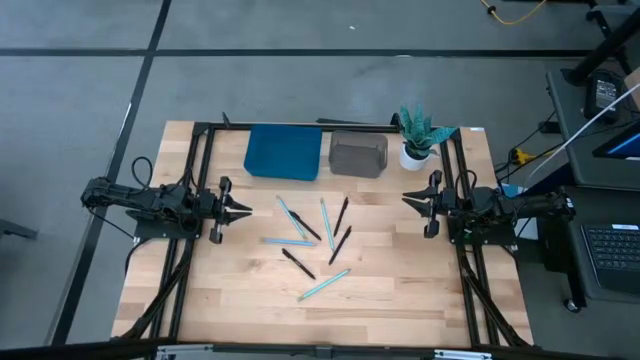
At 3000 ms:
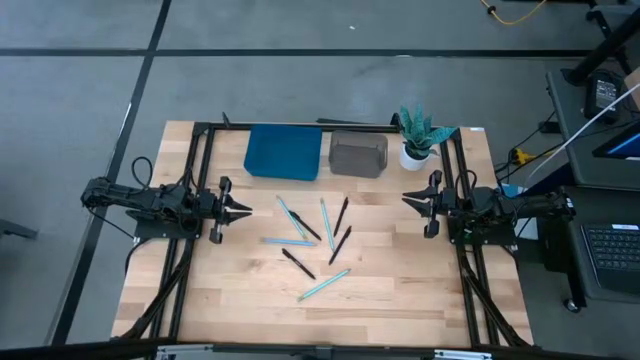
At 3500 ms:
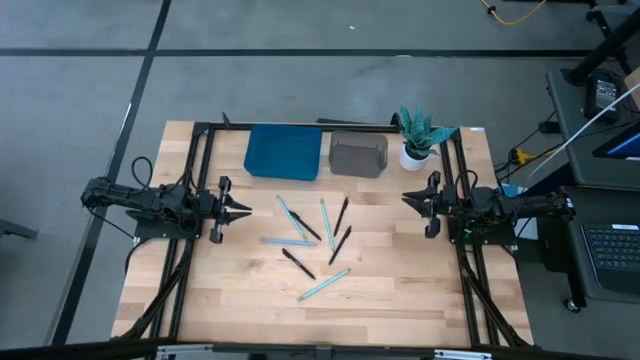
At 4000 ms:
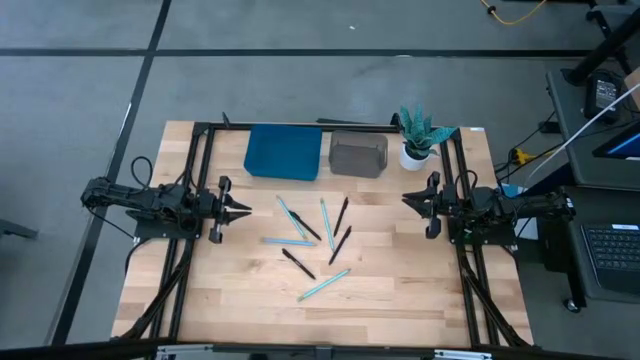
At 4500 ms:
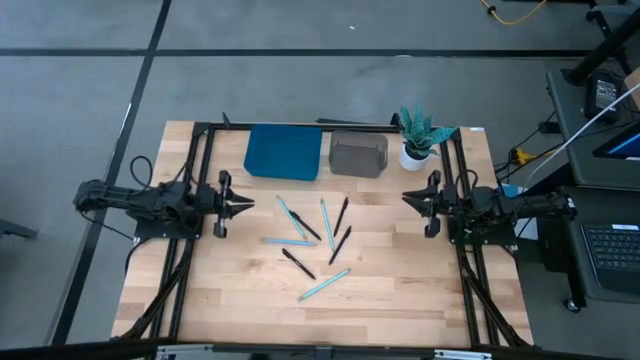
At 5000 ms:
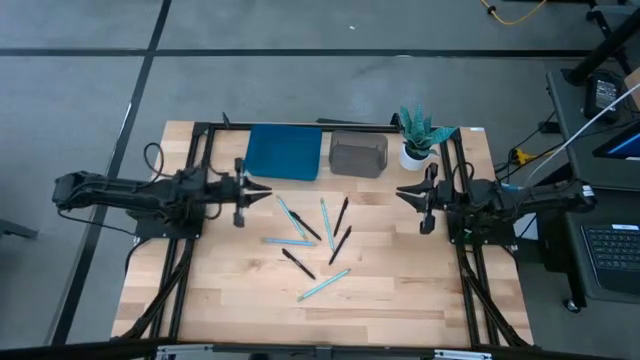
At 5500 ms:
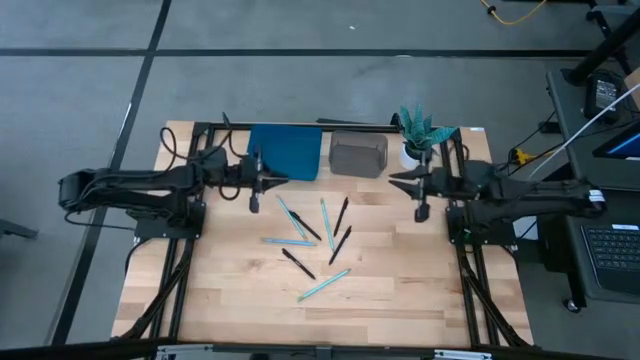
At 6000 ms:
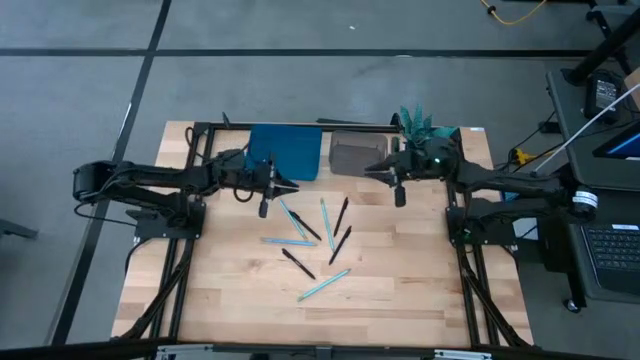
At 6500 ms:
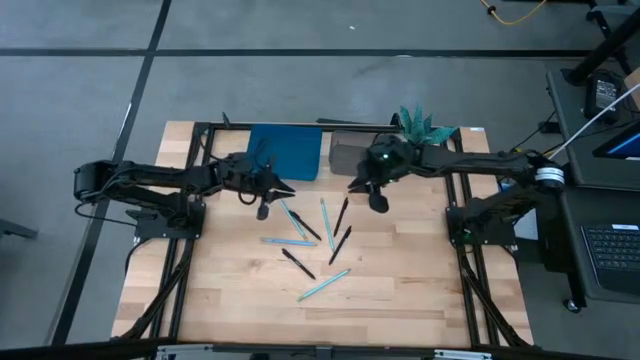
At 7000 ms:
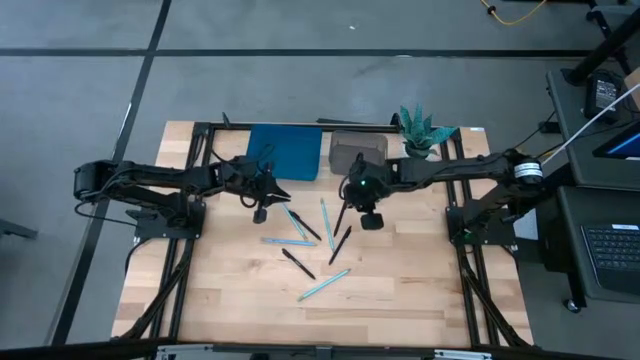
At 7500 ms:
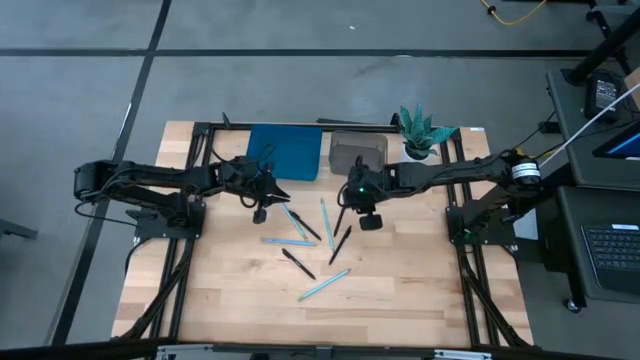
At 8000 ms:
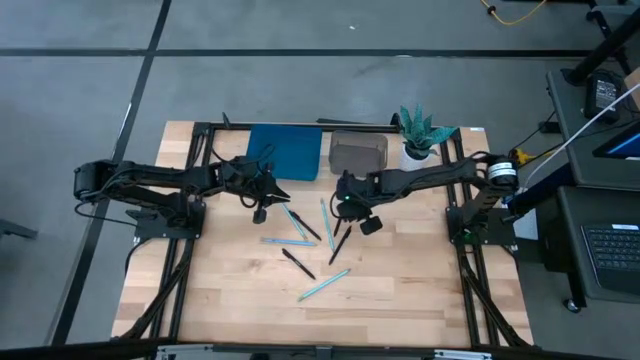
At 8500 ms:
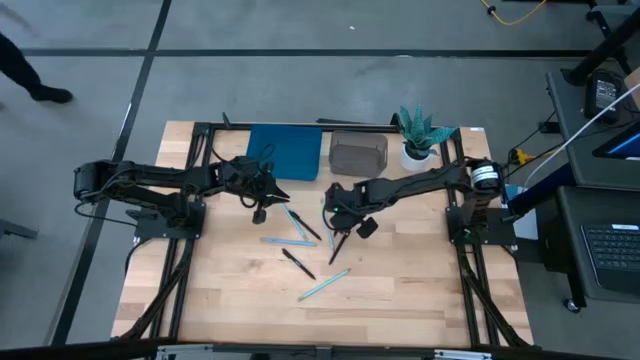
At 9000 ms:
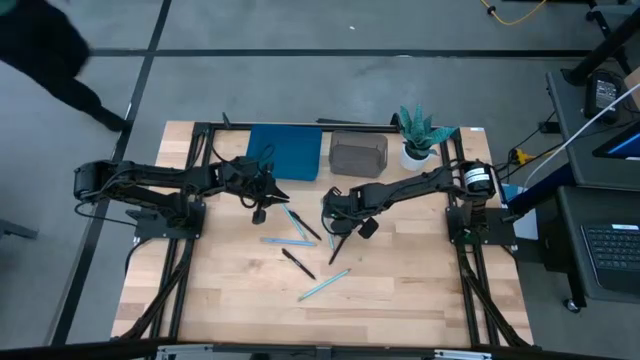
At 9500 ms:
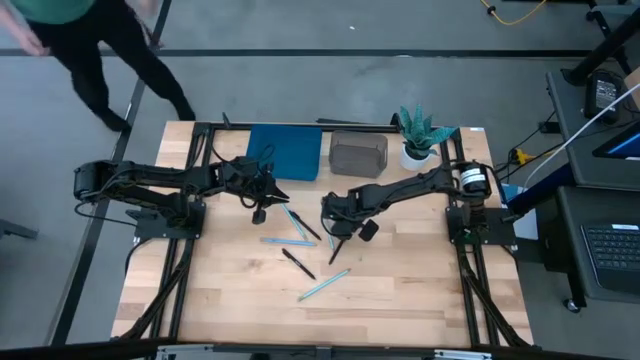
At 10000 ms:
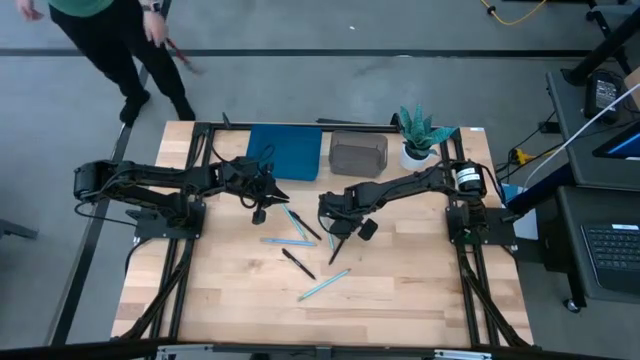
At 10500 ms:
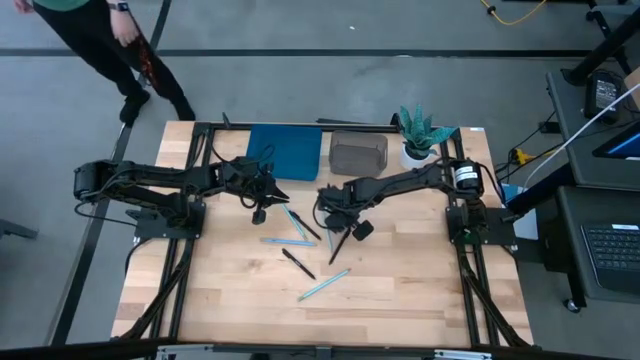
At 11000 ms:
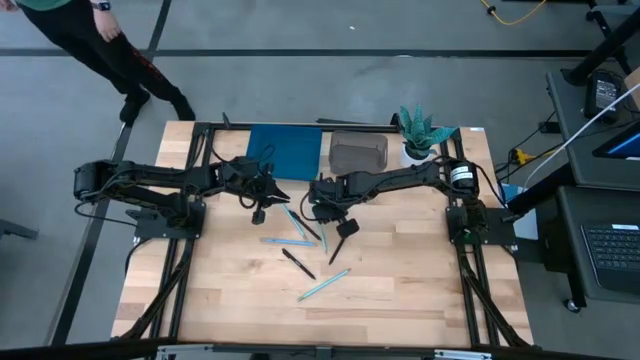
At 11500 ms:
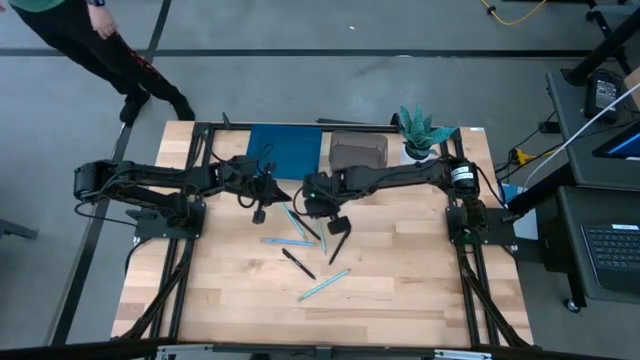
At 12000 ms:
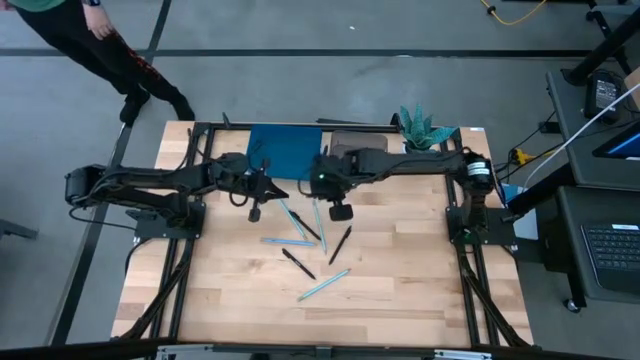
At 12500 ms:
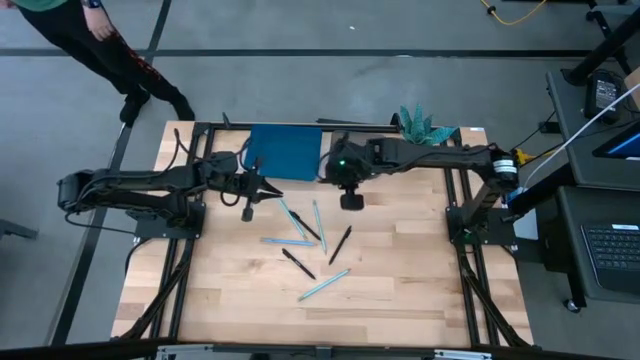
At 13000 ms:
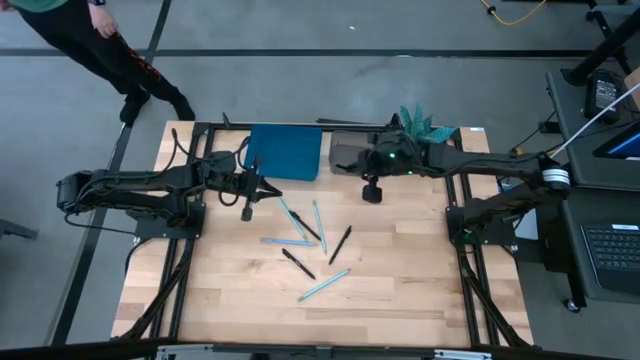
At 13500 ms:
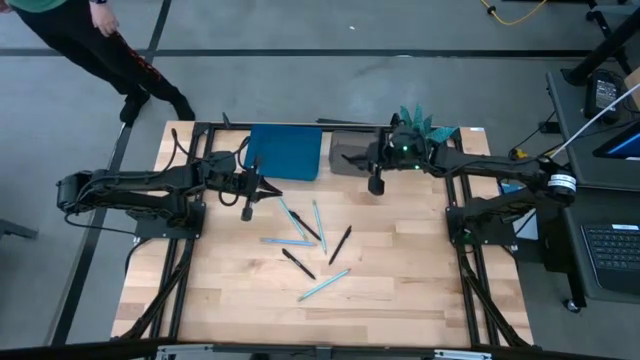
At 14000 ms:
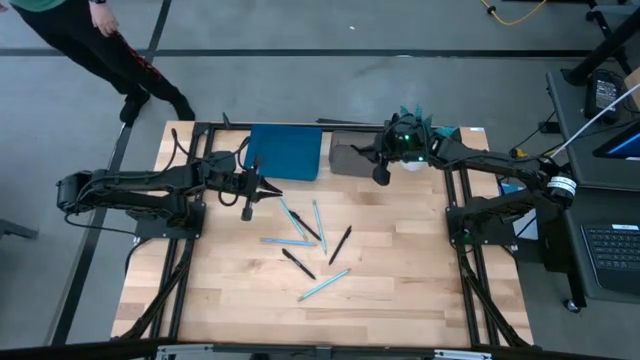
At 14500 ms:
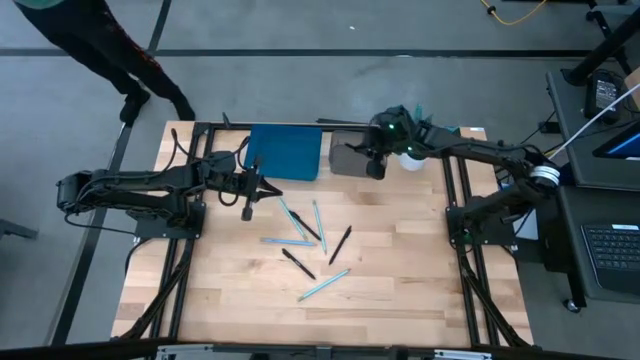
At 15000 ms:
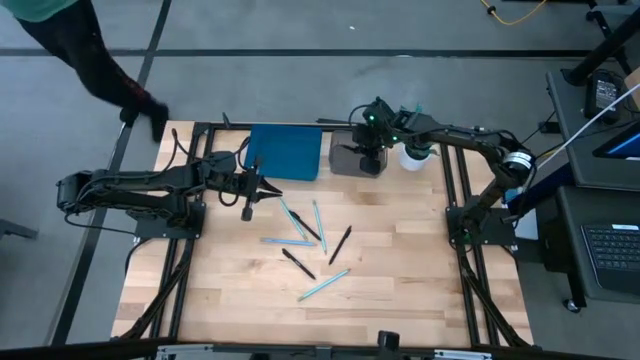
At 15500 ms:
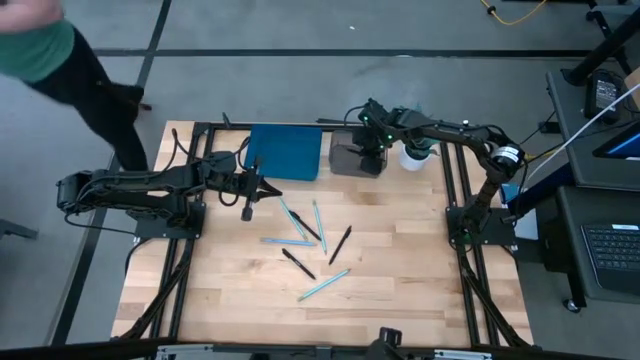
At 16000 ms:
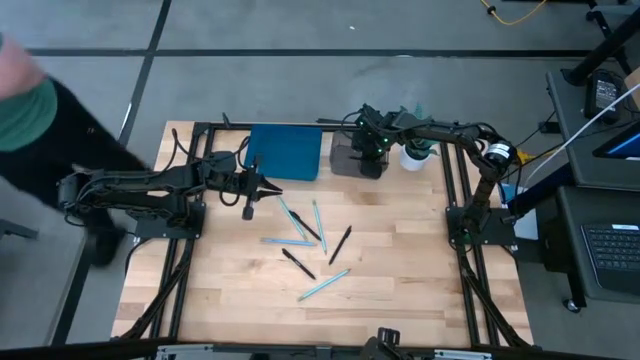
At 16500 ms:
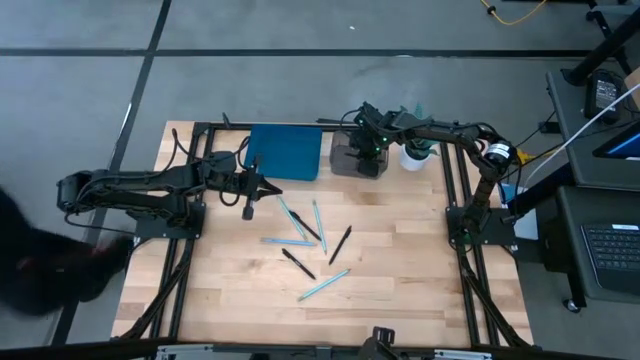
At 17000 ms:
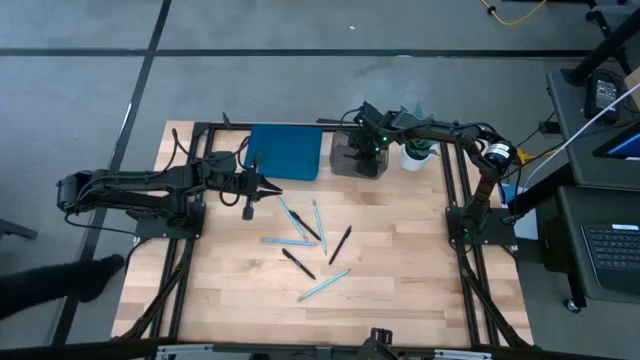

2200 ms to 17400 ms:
Task: Sort pens & pencils
Put the black pen into the black bin

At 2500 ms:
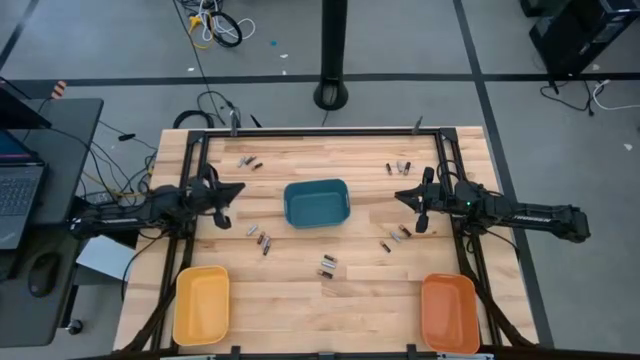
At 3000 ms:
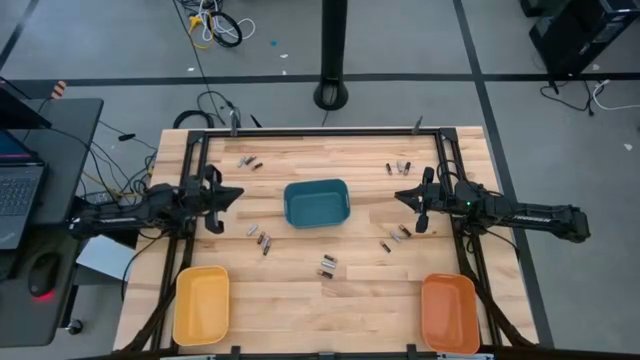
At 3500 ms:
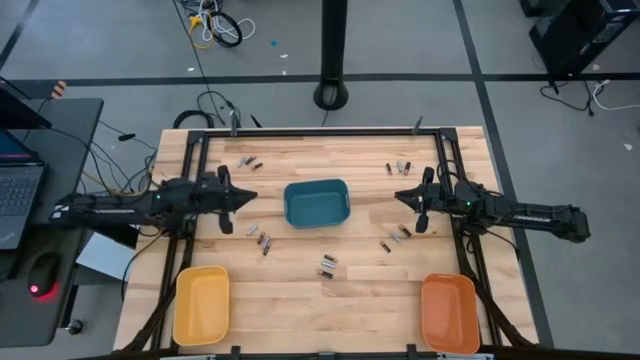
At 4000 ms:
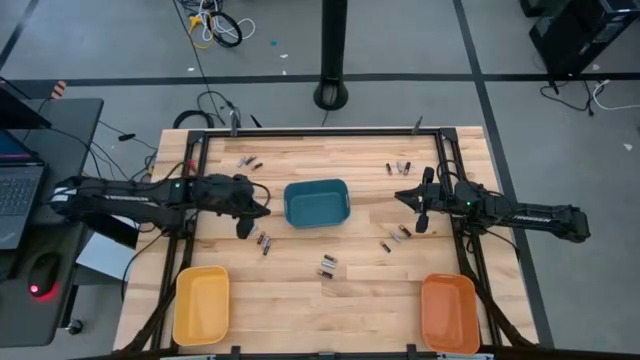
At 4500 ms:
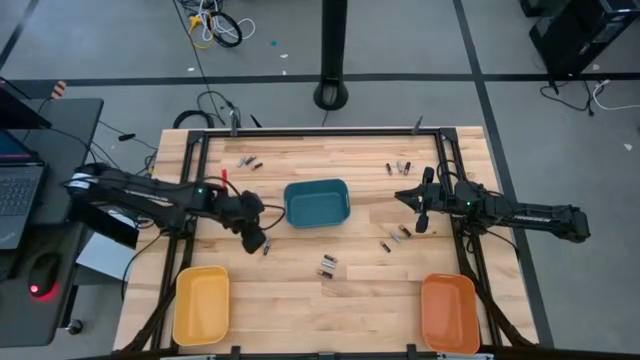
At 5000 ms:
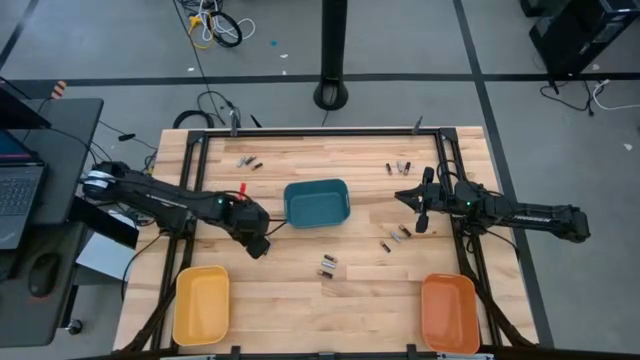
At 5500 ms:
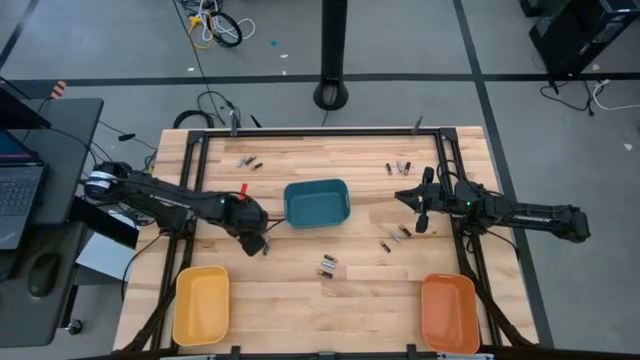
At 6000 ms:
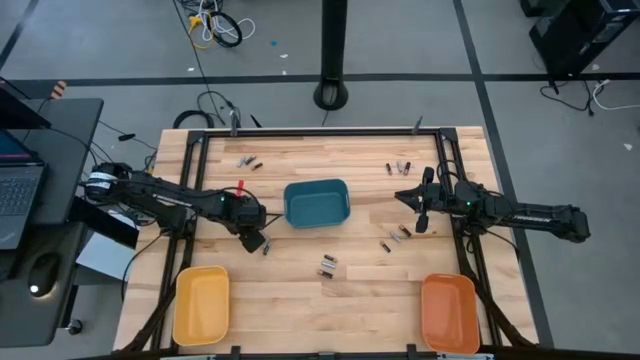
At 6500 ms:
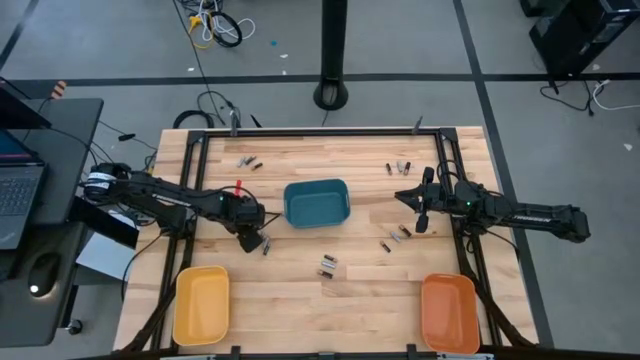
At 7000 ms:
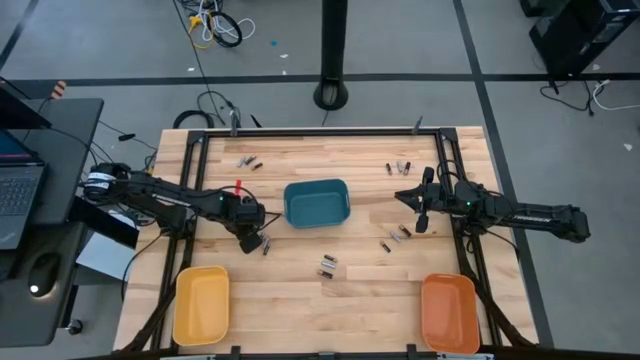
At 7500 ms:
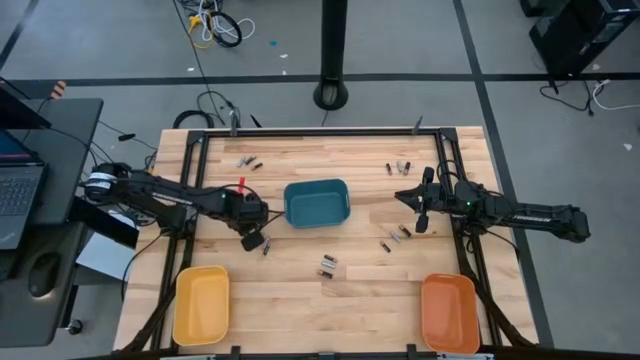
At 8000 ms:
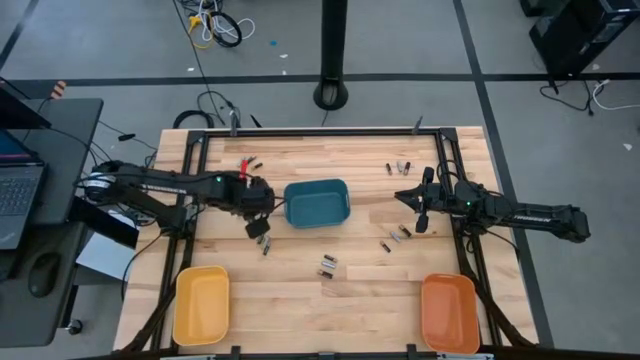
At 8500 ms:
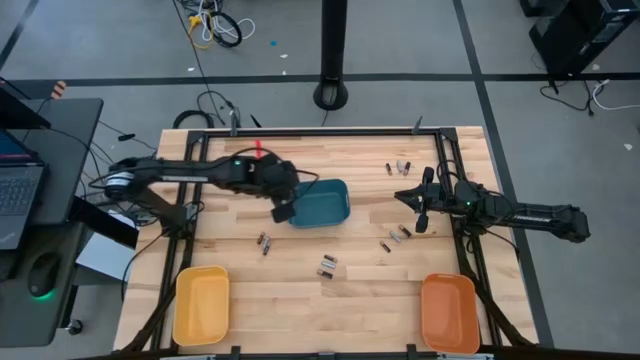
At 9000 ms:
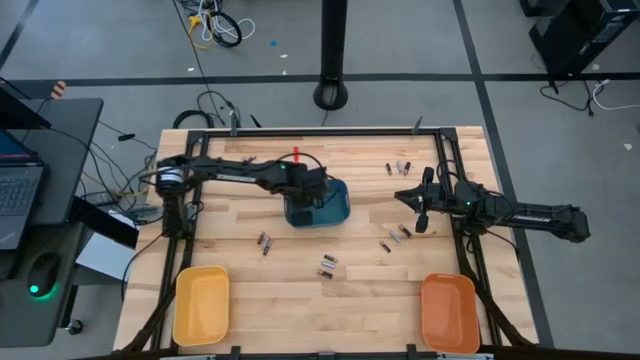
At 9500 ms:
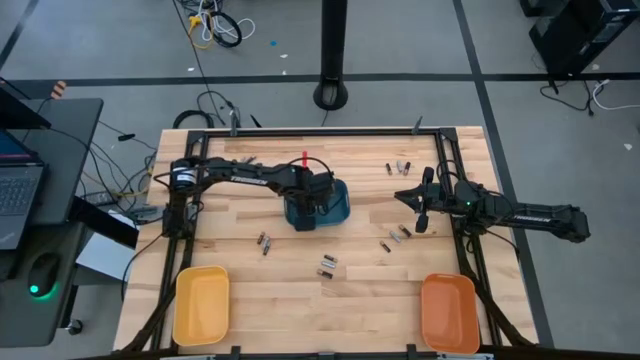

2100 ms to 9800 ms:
Task: Sort batteries
Put the silver battery into the blue bin
